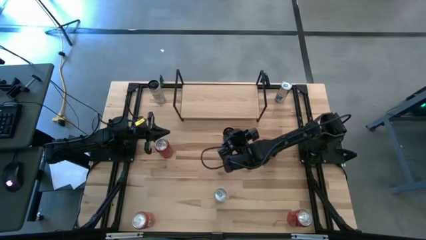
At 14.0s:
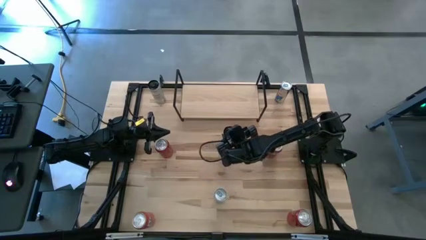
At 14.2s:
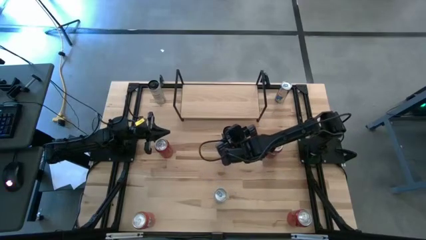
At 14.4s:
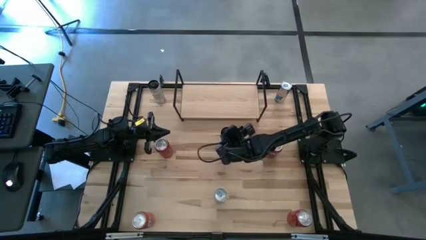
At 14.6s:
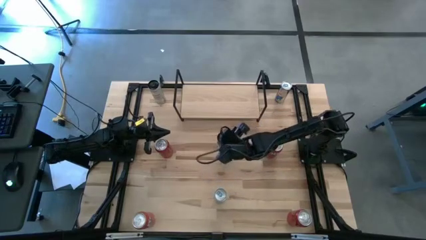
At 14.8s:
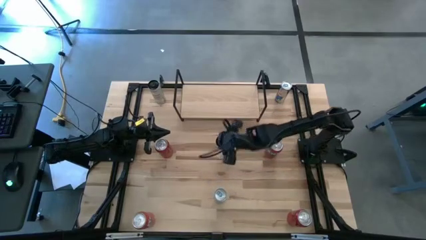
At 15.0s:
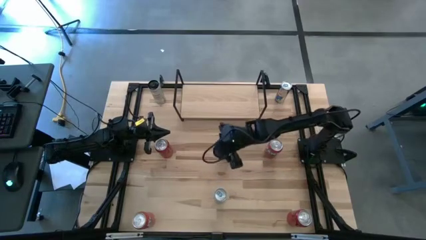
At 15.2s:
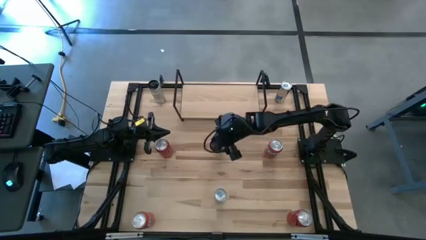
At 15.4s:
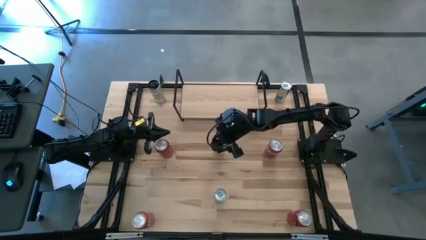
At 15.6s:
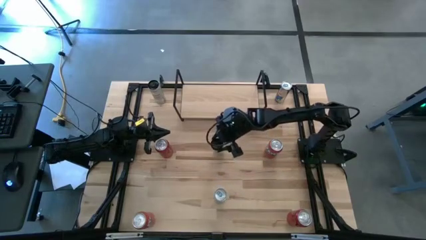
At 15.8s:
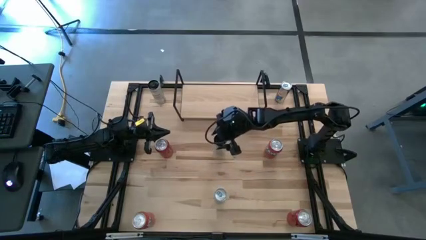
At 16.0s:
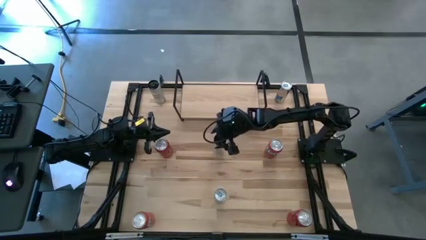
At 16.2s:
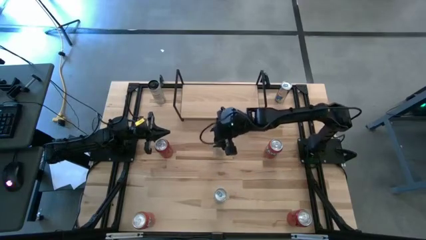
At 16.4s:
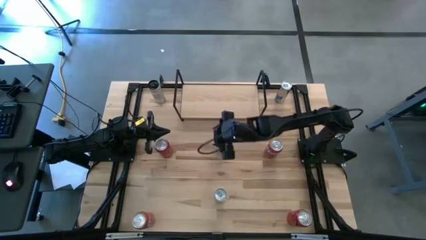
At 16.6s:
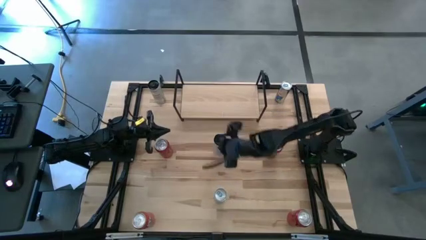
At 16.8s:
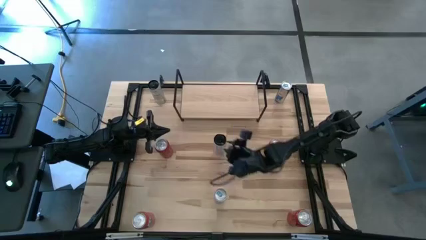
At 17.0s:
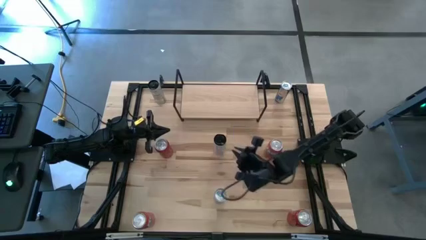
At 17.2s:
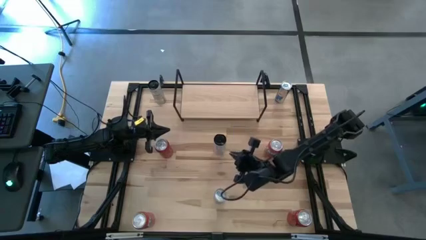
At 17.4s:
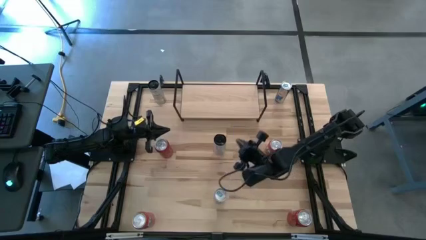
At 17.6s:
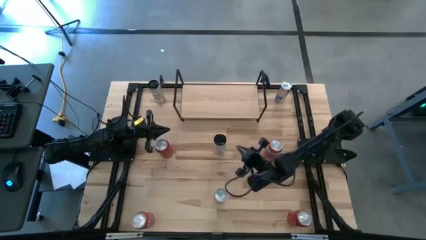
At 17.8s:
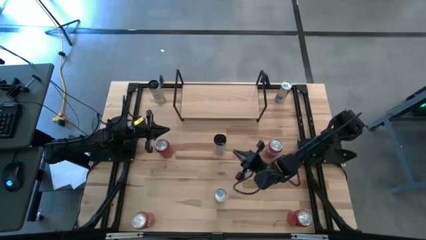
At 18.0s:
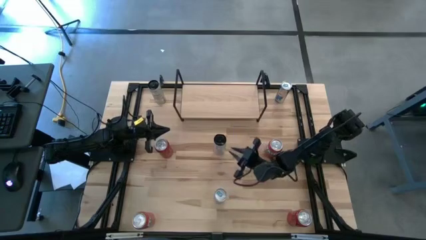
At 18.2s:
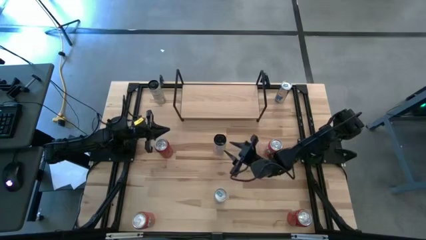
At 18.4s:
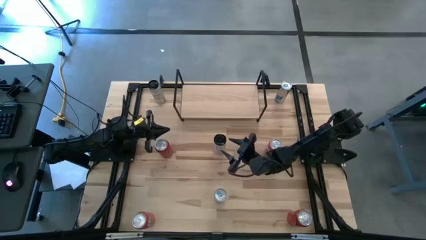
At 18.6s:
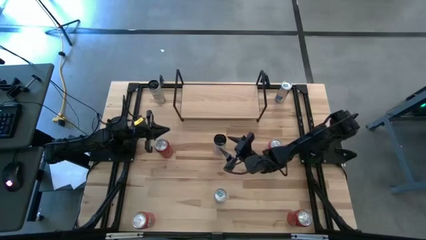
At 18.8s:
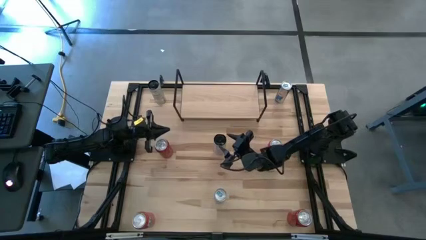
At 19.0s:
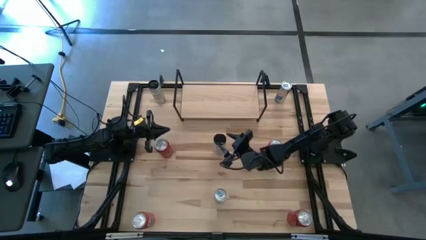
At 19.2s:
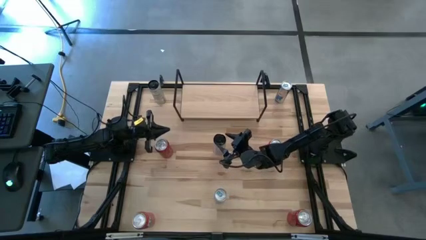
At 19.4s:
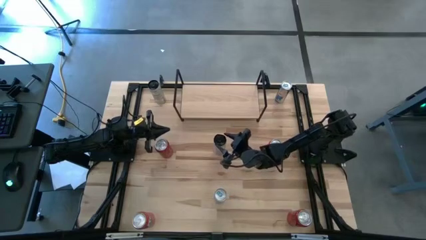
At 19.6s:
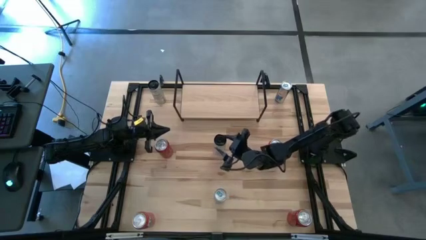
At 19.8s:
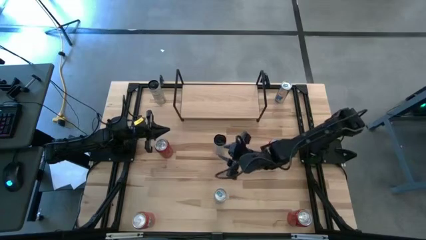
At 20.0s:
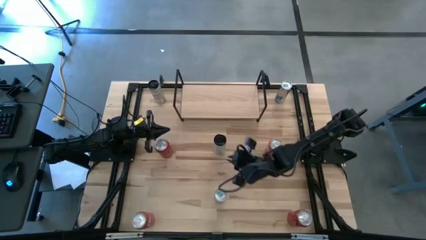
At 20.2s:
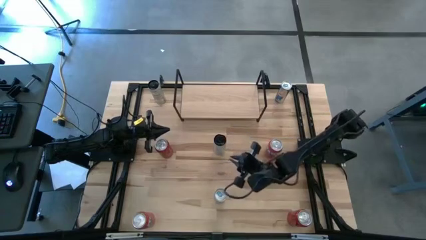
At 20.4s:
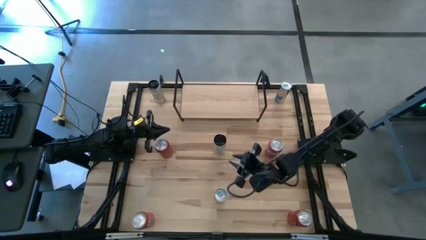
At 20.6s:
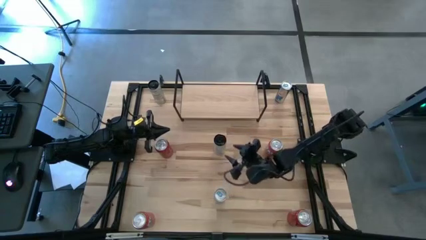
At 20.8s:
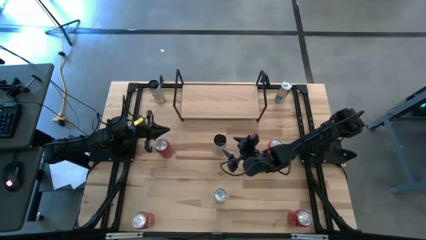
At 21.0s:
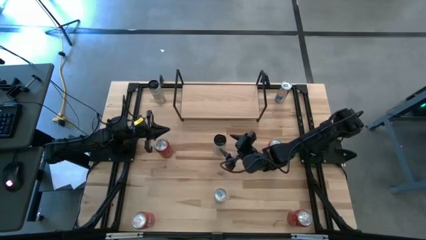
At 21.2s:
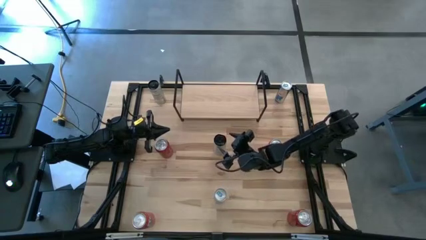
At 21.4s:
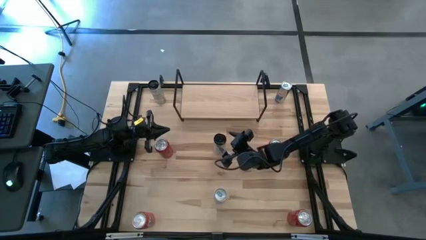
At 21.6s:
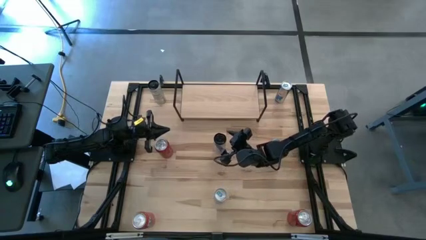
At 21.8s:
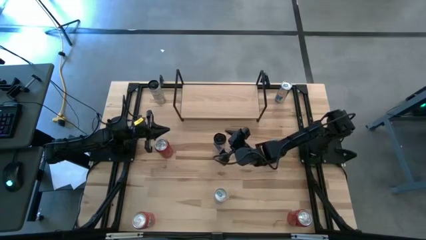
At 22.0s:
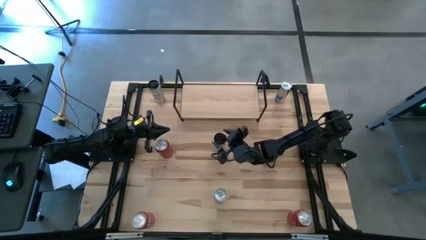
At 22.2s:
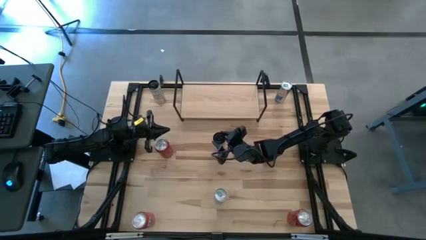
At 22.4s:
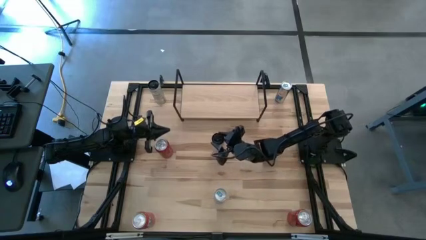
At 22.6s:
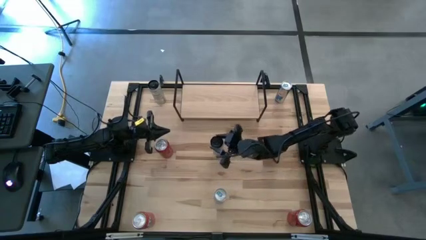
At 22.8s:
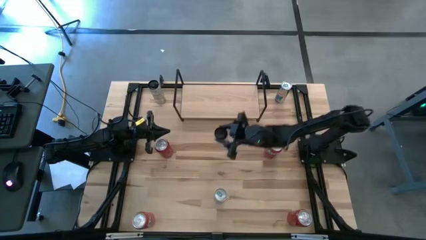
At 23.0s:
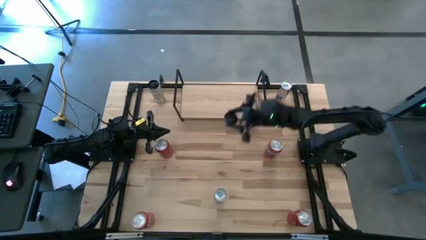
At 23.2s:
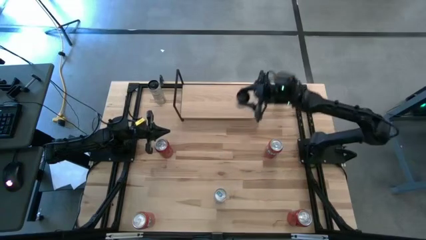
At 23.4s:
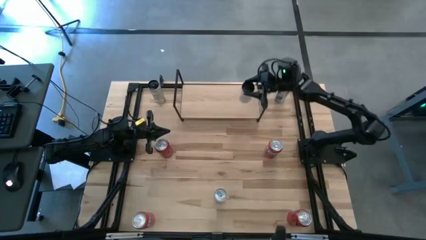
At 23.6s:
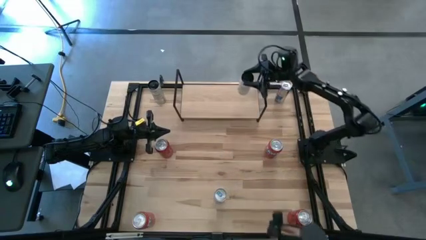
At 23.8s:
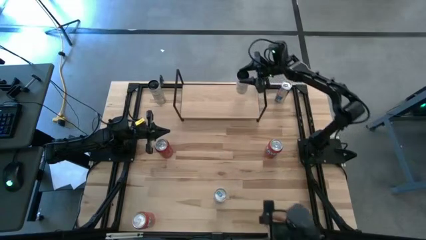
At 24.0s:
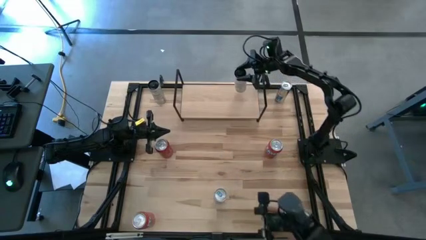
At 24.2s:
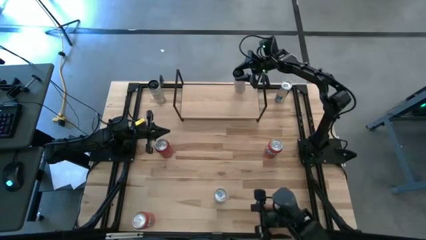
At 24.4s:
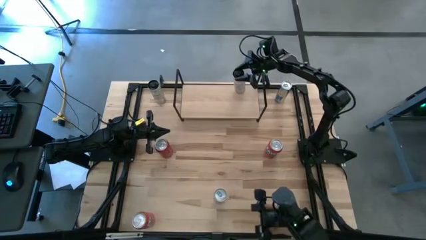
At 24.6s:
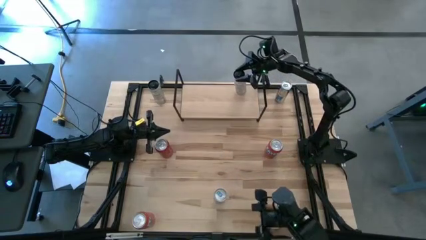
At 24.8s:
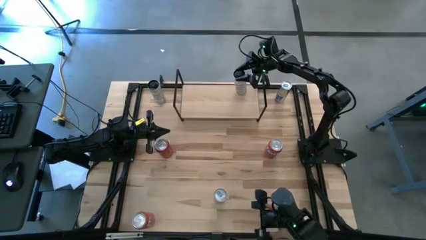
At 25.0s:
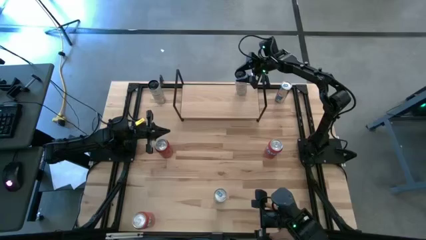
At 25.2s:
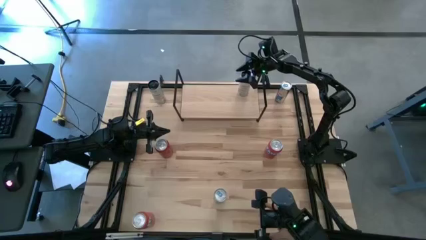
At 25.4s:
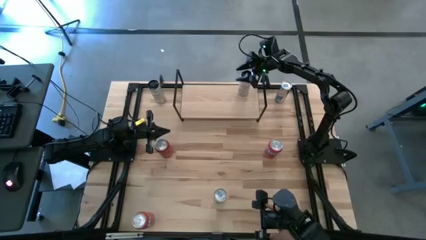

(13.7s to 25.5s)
Task: Place canned beverage on shelf
Put the bottom white yellow soda can on the shelf

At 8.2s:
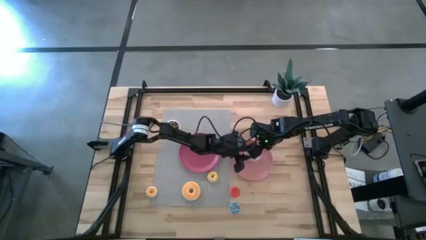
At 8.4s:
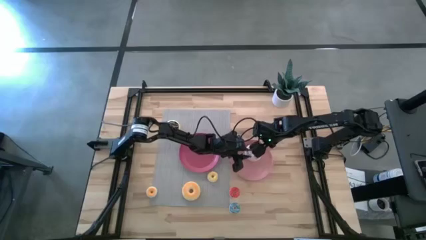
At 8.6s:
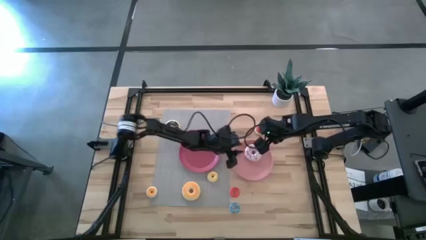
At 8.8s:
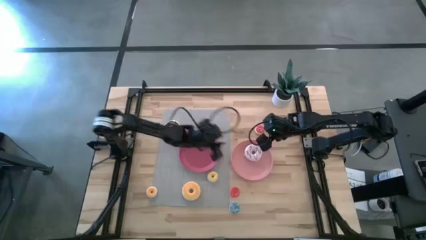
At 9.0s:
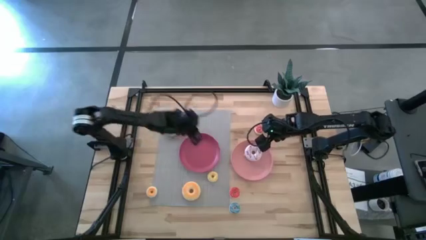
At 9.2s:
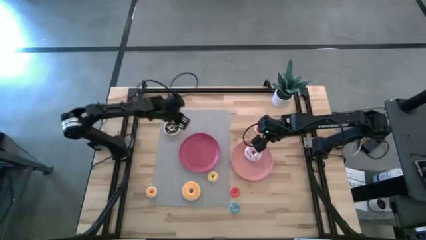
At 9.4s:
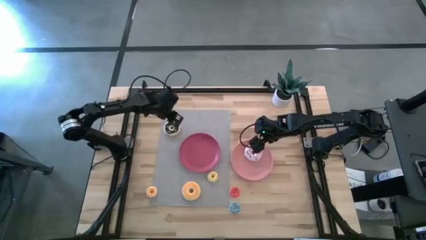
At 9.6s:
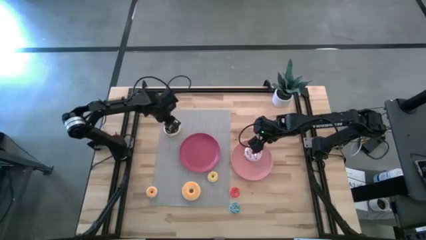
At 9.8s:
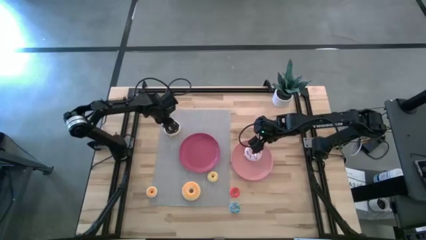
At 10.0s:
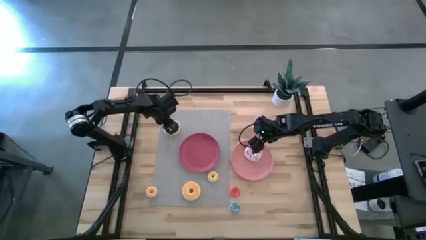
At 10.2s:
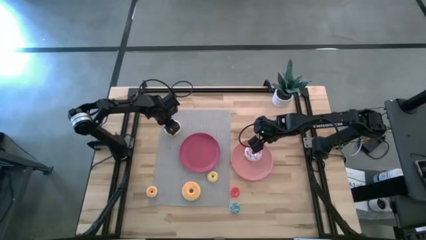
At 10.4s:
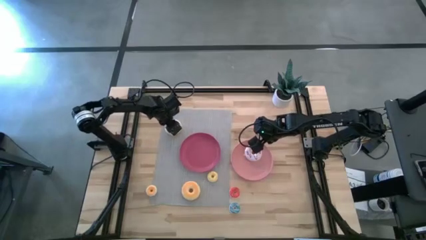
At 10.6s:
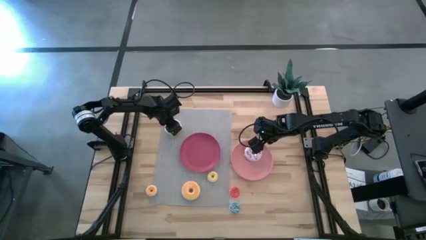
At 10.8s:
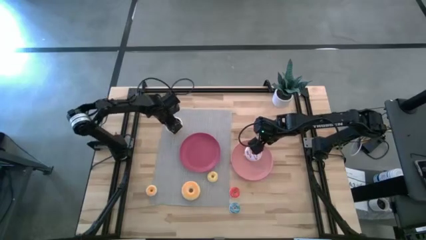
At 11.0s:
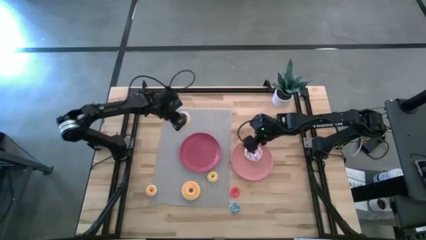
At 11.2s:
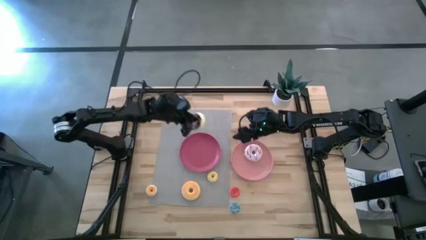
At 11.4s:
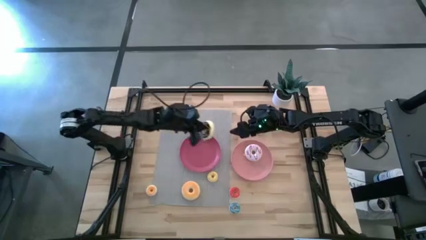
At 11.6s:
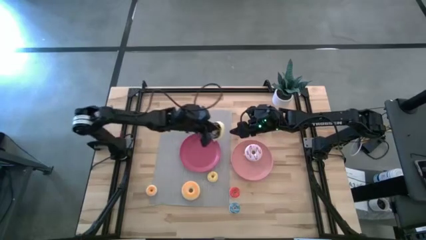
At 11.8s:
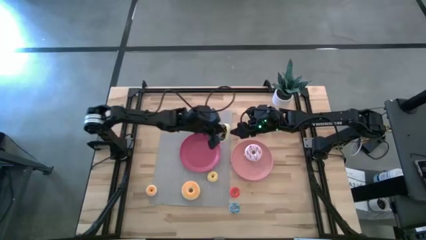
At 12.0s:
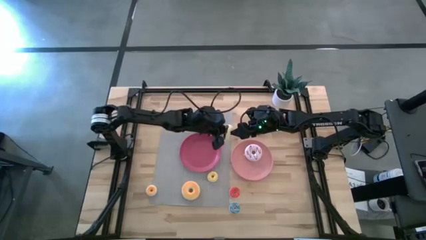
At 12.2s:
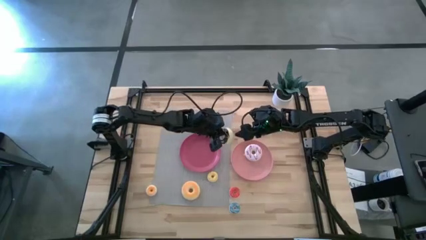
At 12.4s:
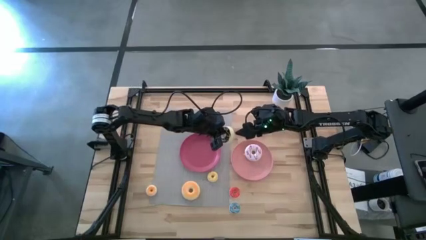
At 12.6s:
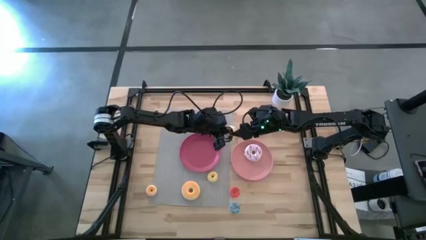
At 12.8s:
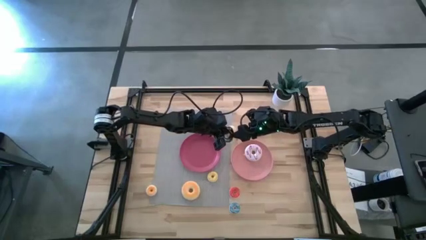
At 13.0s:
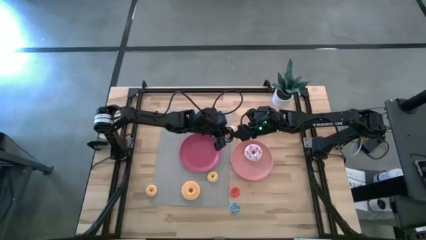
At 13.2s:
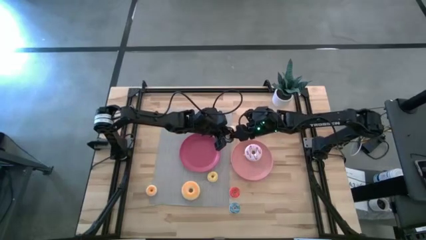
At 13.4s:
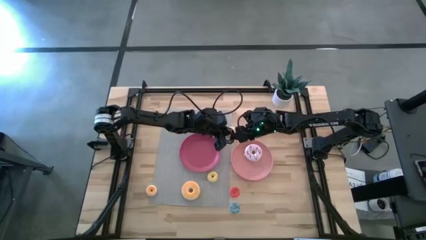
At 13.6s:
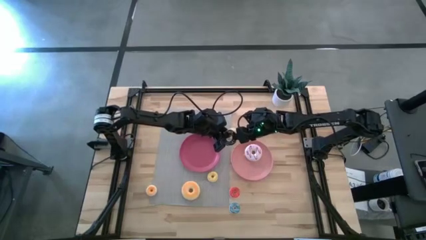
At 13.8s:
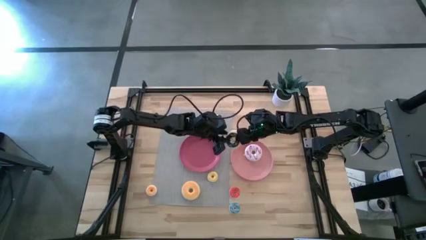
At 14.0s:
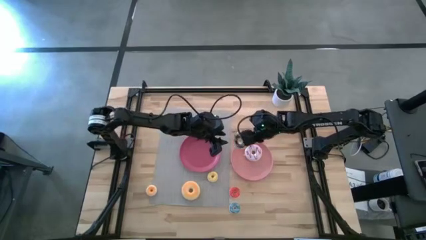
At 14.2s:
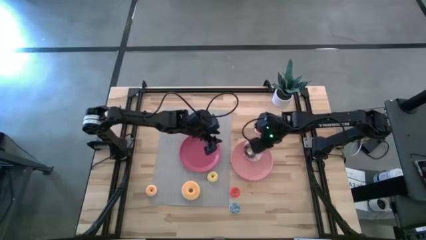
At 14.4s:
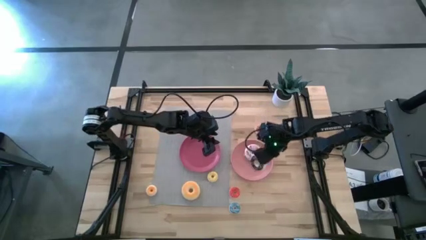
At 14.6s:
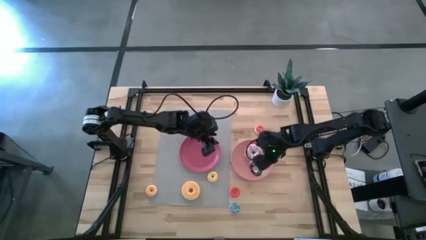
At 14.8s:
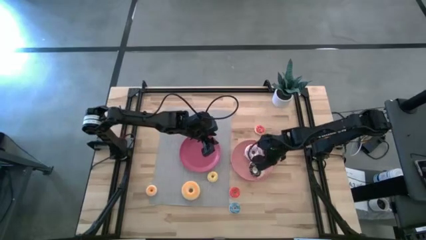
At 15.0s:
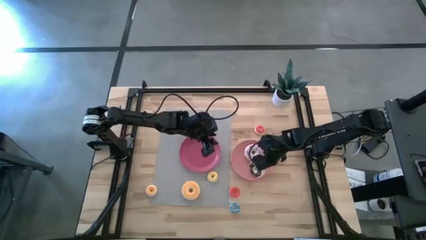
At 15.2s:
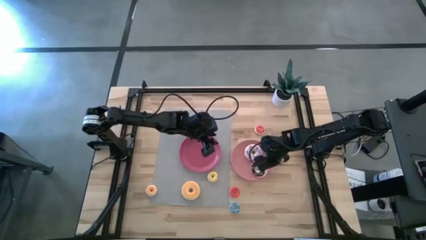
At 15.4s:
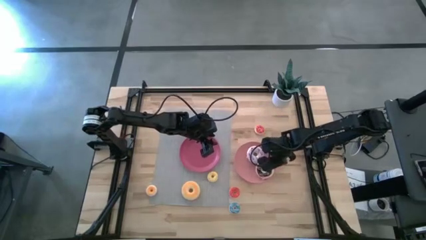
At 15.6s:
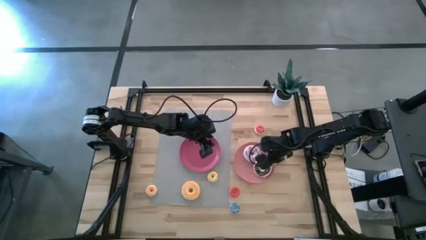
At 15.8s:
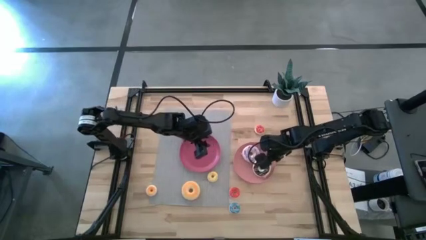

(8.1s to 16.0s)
Task: Pick & Place donuts
Put the large black donut into the light pink plate
